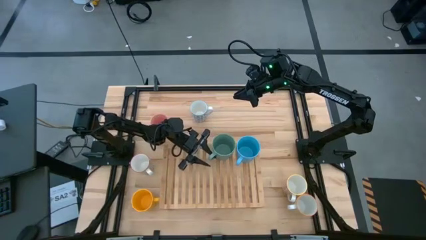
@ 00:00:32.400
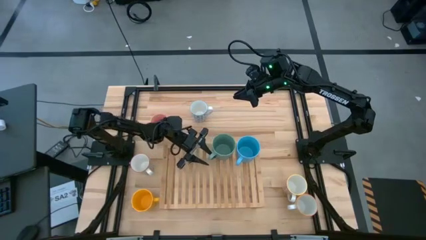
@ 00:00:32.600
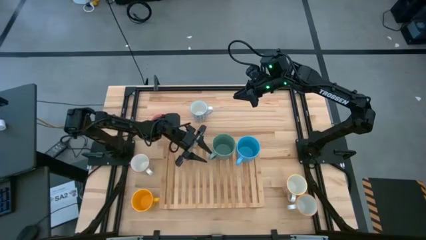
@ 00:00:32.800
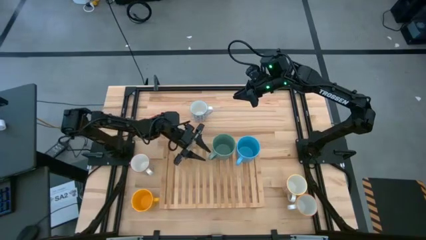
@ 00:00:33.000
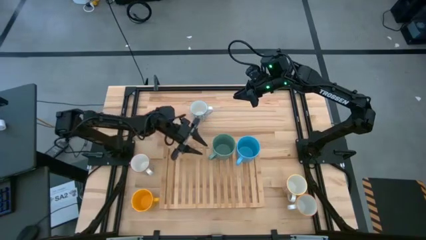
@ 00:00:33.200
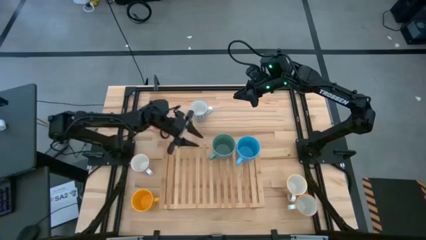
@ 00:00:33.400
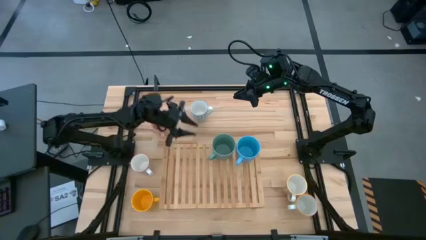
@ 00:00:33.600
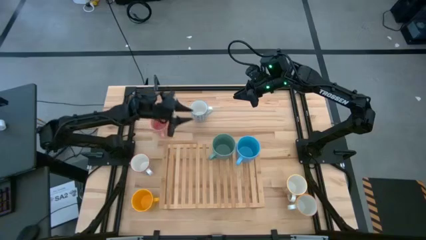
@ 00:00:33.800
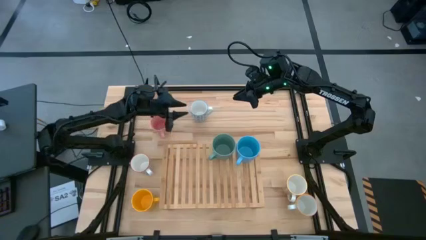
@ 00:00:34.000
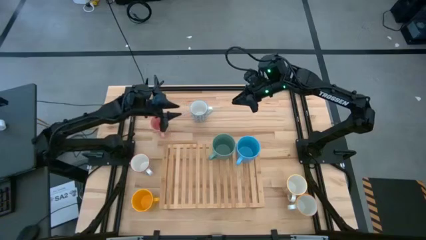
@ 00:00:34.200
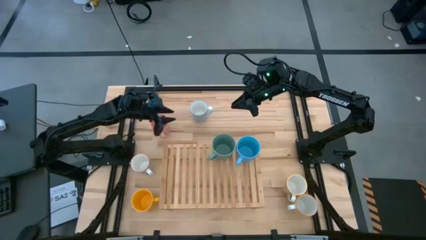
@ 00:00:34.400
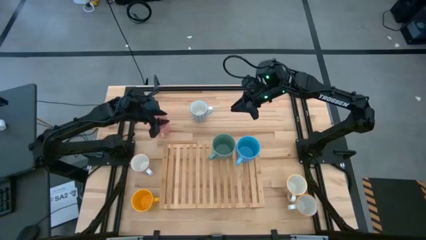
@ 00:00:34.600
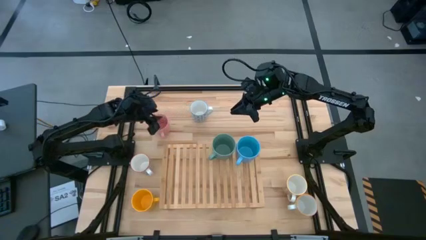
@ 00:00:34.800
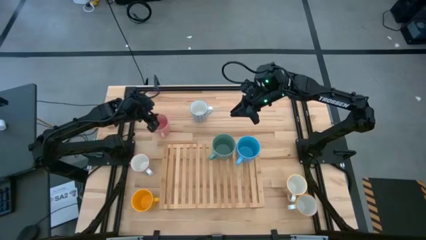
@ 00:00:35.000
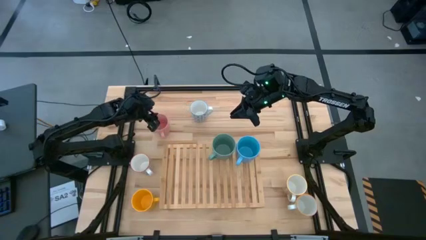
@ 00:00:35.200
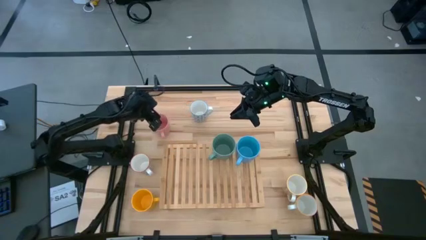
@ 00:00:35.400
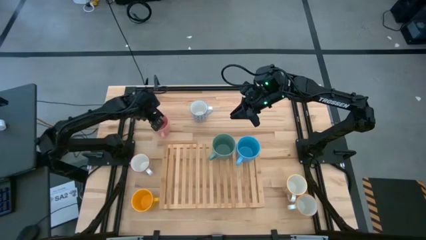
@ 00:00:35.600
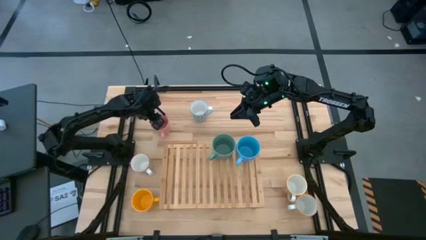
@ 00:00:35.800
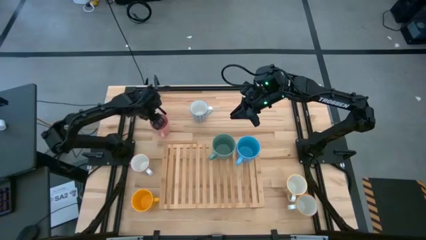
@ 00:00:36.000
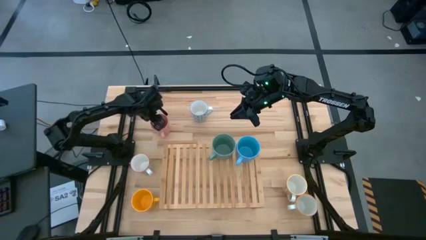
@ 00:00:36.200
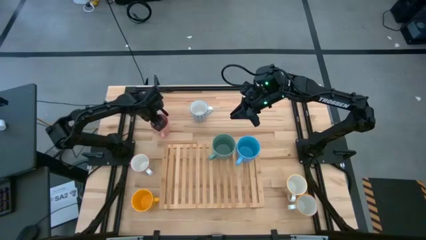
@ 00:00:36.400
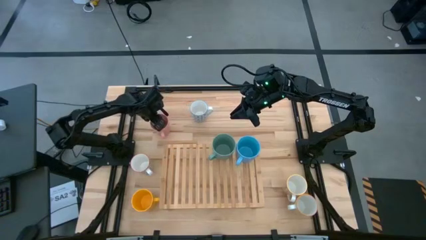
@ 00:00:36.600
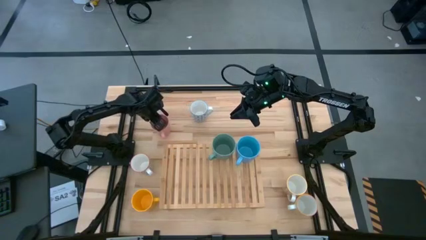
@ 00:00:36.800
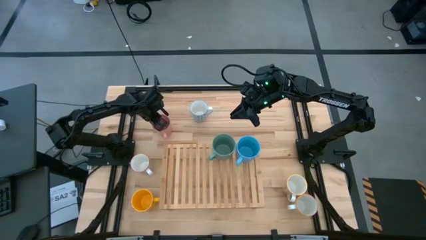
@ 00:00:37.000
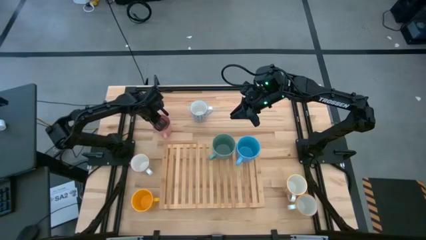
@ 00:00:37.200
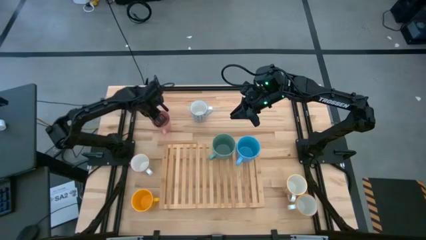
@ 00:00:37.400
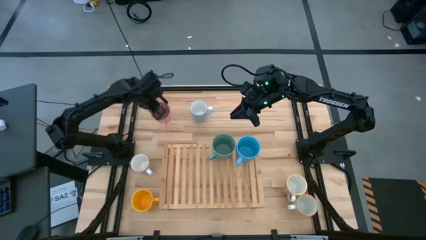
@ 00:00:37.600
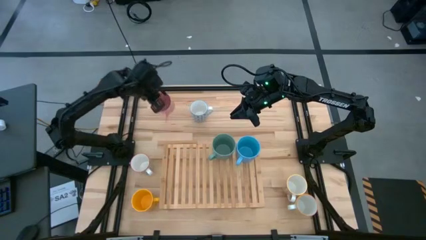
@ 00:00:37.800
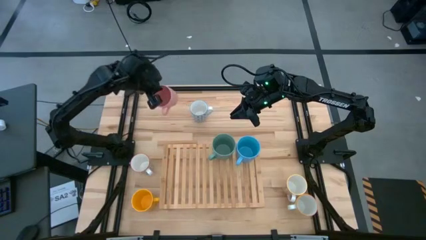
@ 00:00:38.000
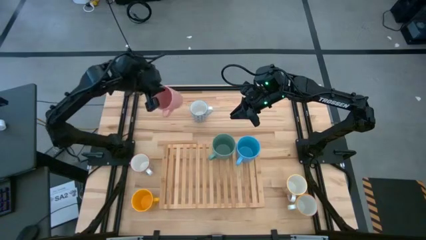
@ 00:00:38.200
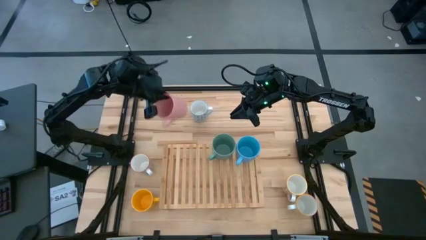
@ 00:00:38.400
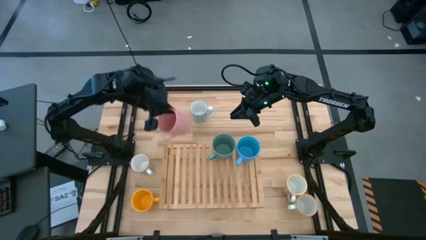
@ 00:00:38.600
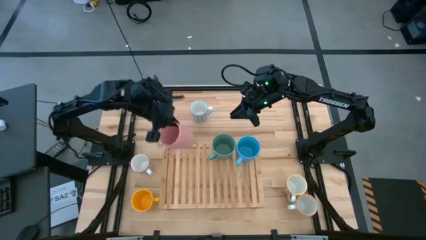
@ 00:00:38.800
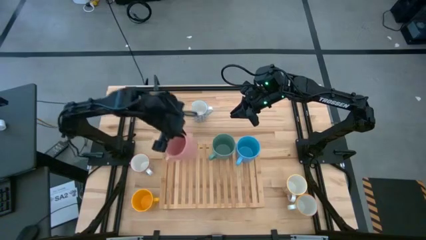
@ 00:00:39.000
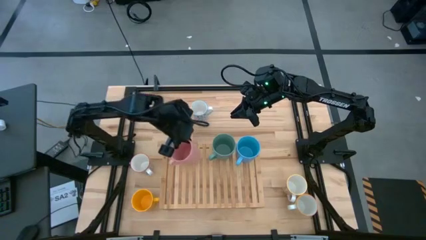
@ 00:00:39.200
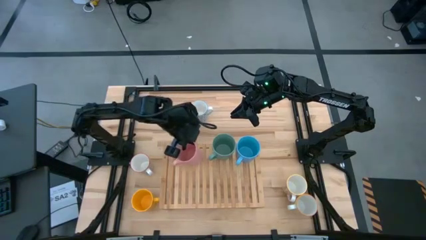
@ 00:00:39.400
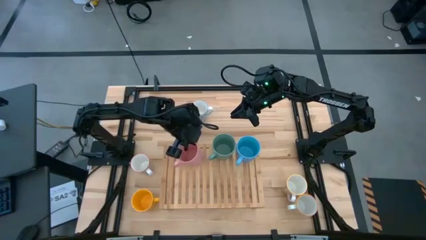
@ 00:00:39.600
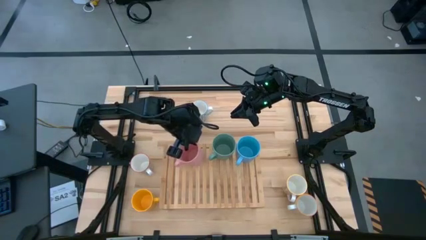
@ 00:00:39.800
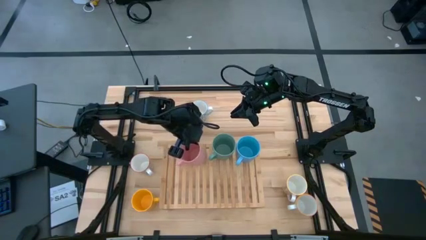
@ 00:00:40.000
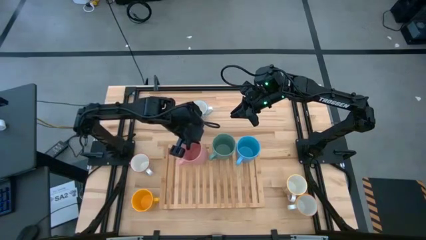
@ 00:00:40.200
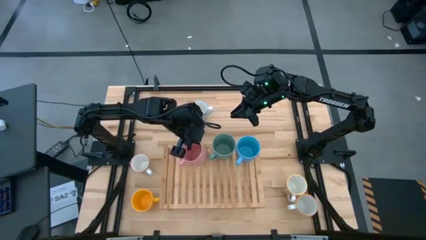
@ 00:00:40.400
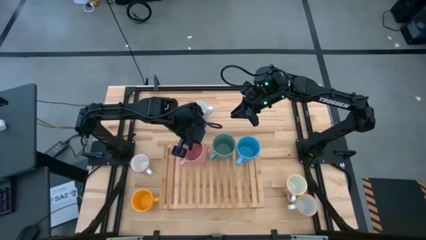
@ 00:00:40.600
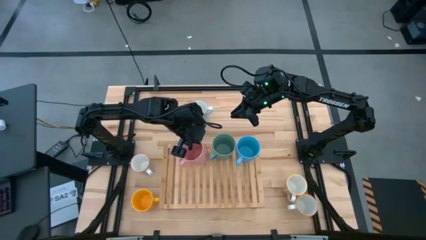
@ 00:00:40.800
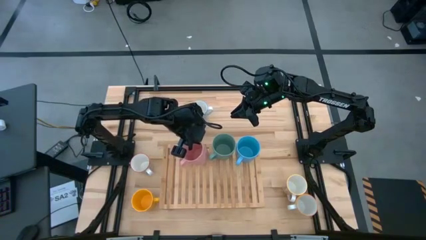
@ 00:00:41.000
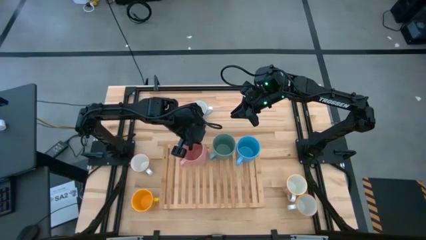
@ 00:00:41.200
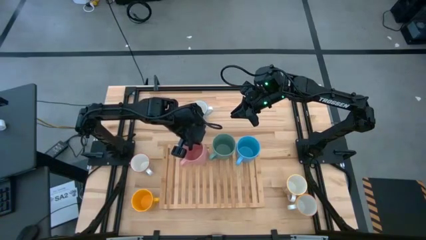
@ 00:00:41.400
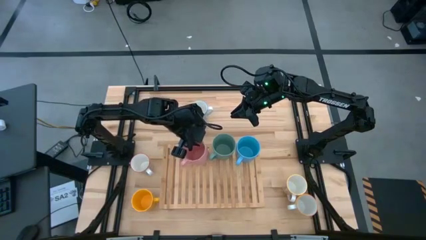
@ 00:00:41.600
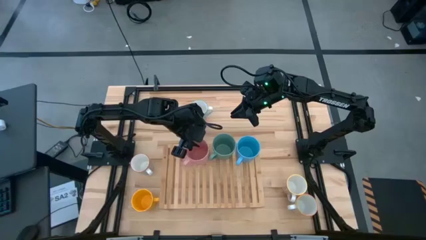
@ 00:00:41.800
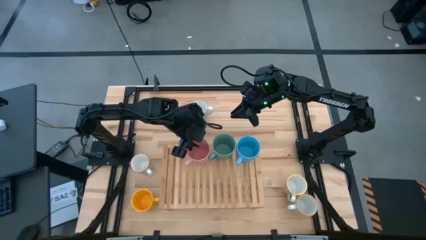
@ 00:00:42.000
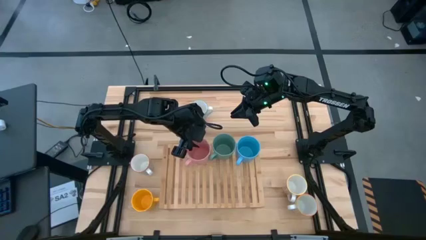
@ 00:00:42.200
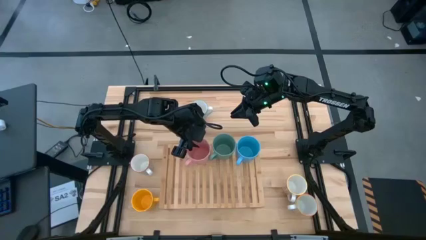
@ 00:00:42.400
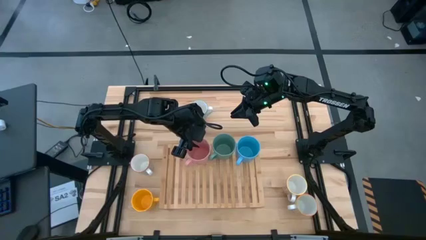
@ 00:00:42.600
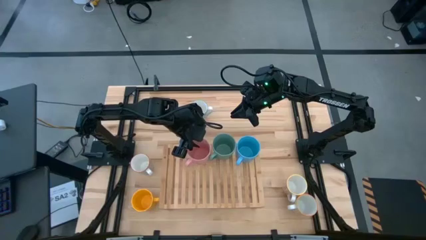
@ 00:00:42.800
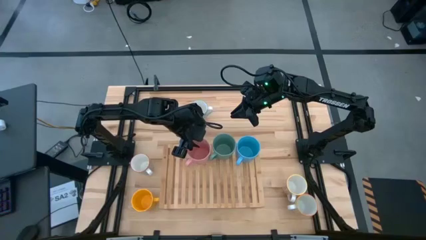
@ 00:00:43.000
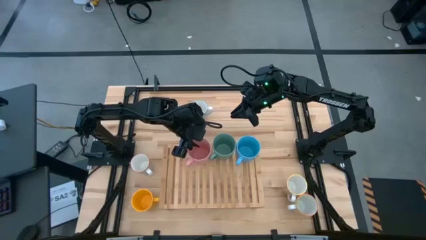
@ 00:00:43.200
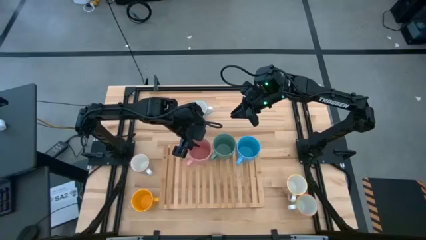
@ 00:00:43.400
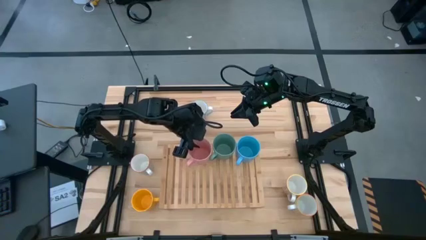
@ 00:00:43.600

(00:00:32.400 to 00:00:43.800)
Task: Place coffee mugs
Put the pink mug on the shelf
